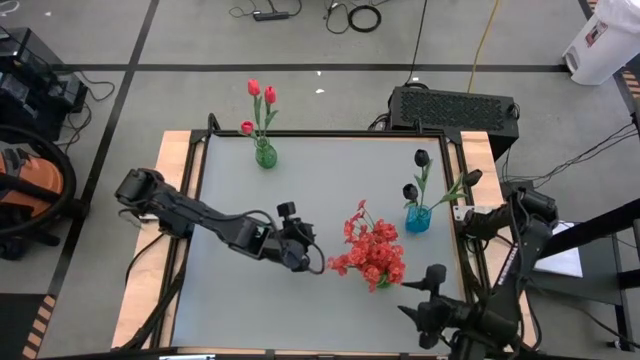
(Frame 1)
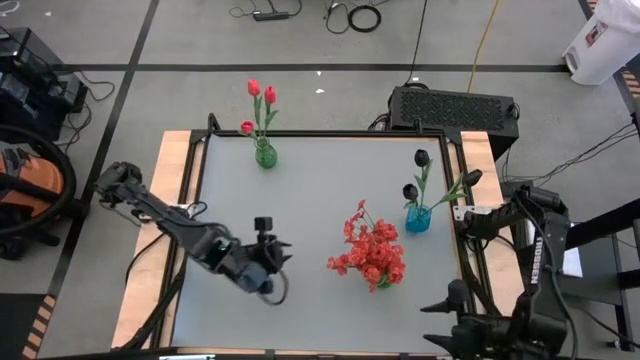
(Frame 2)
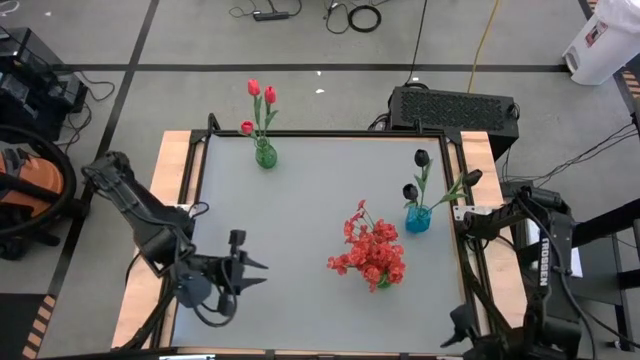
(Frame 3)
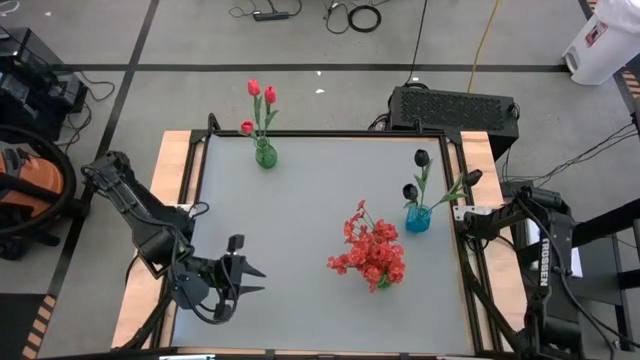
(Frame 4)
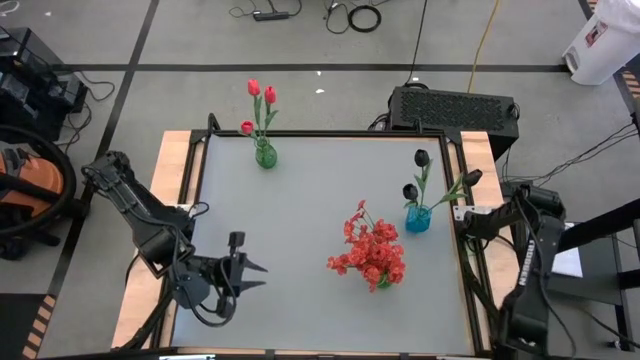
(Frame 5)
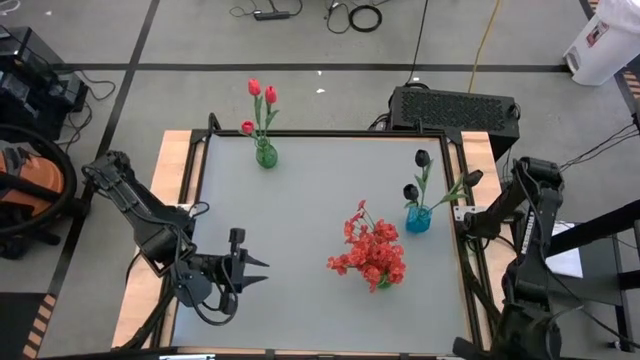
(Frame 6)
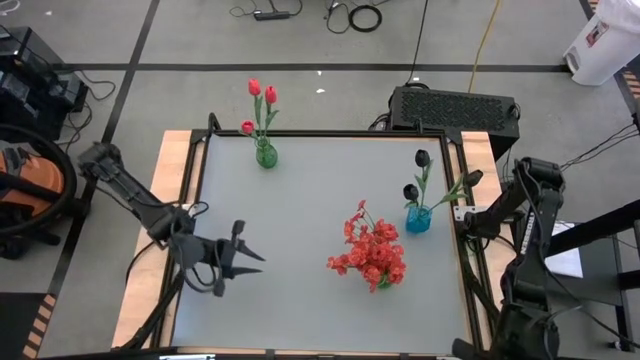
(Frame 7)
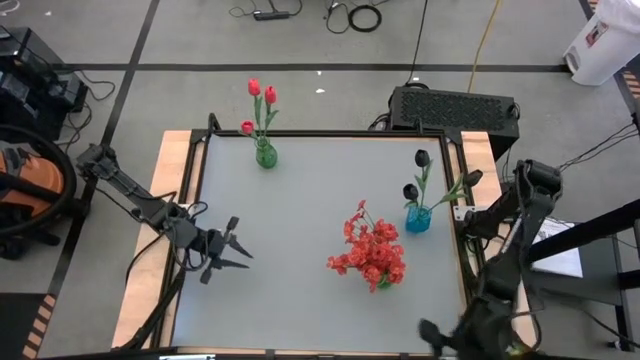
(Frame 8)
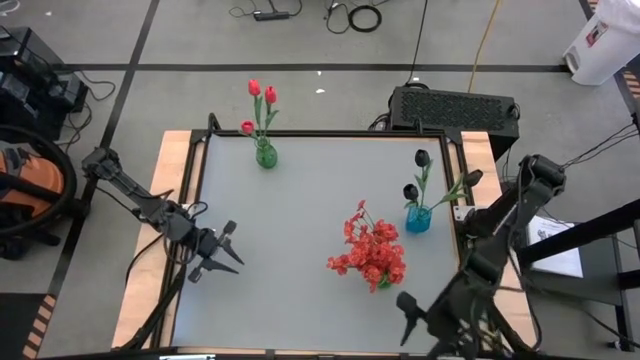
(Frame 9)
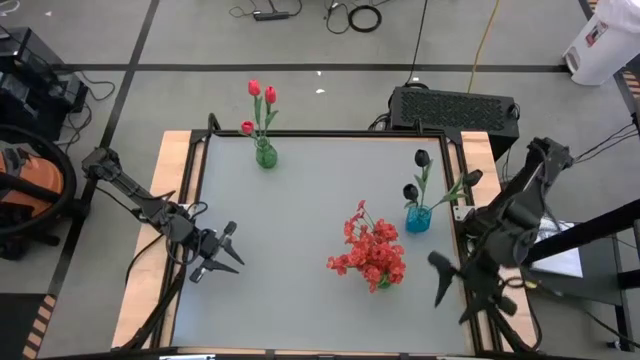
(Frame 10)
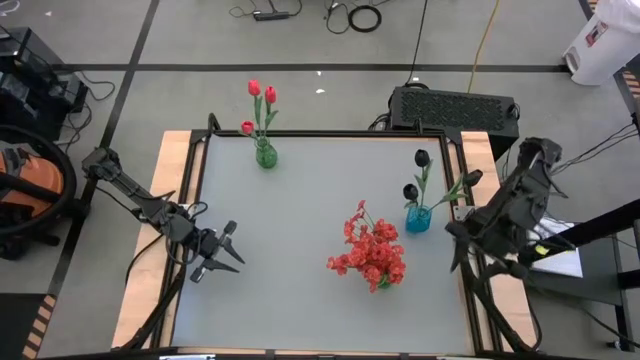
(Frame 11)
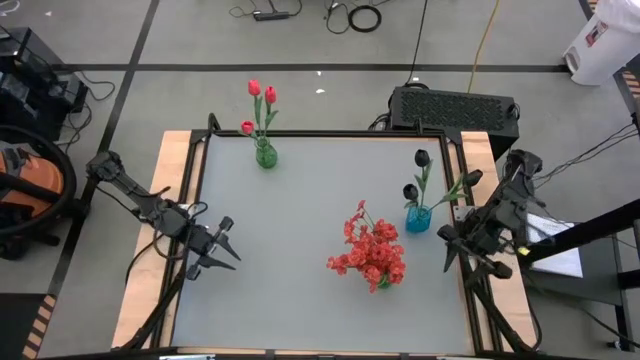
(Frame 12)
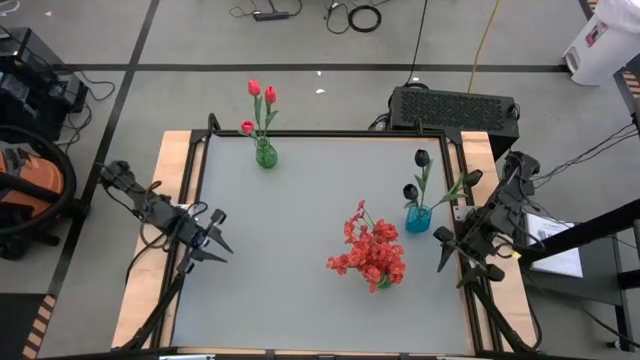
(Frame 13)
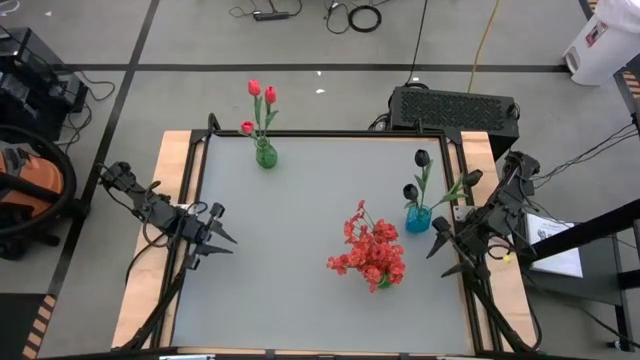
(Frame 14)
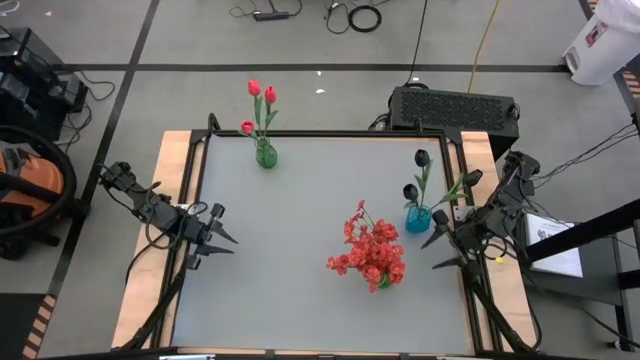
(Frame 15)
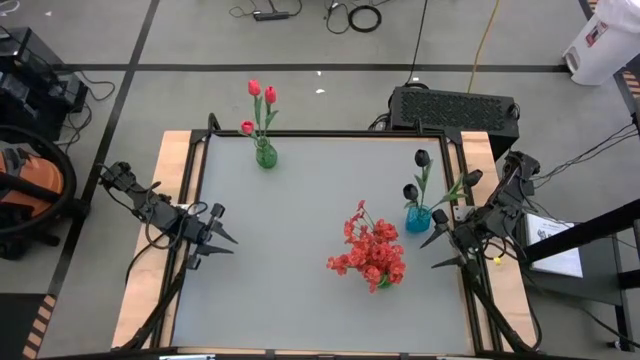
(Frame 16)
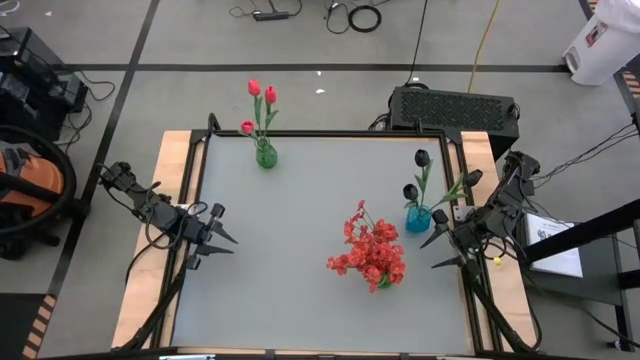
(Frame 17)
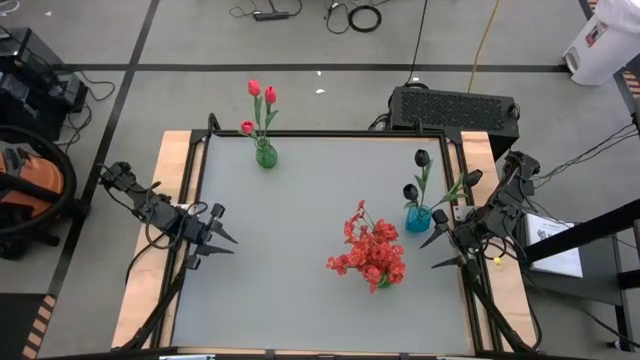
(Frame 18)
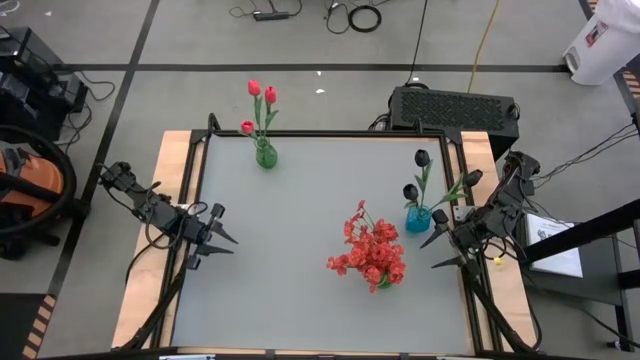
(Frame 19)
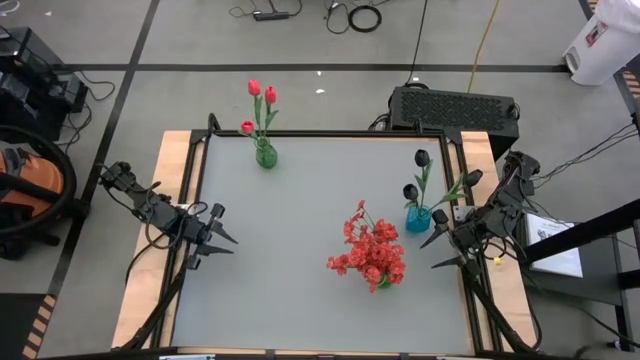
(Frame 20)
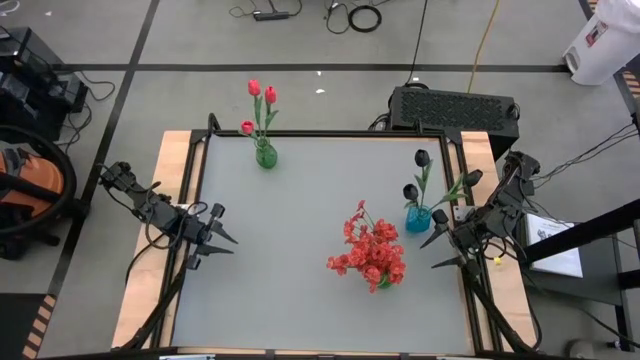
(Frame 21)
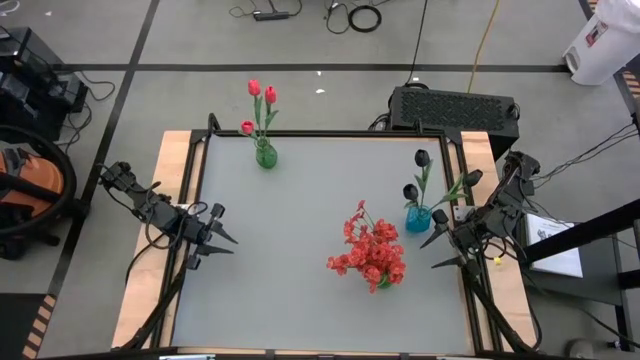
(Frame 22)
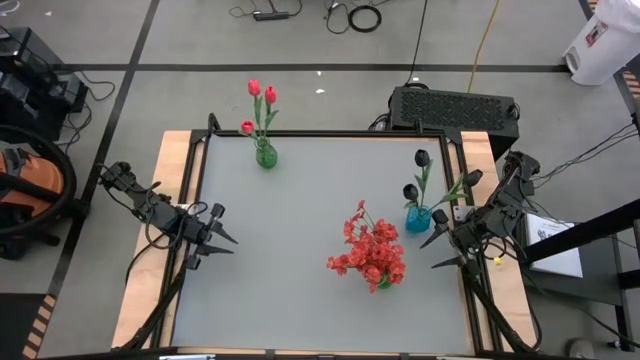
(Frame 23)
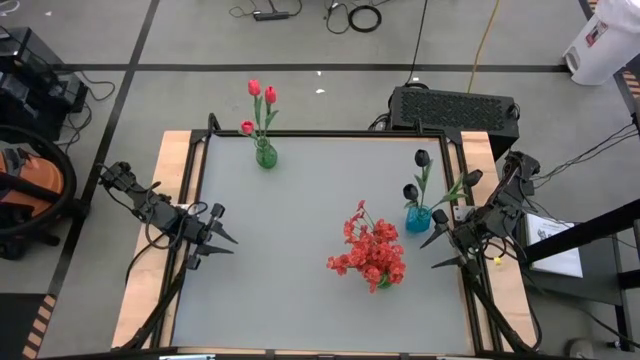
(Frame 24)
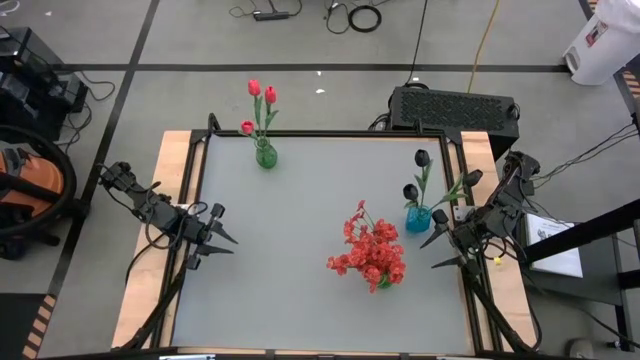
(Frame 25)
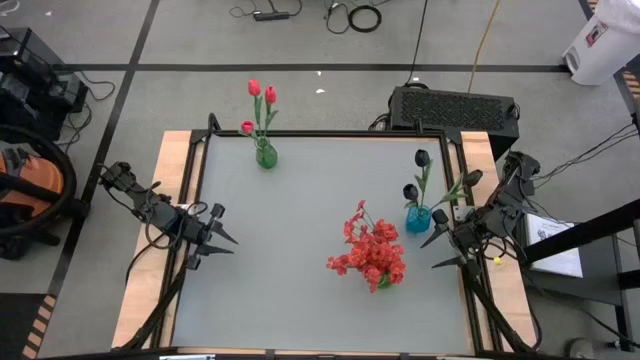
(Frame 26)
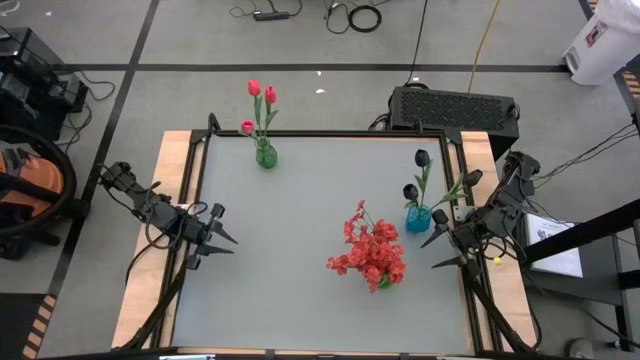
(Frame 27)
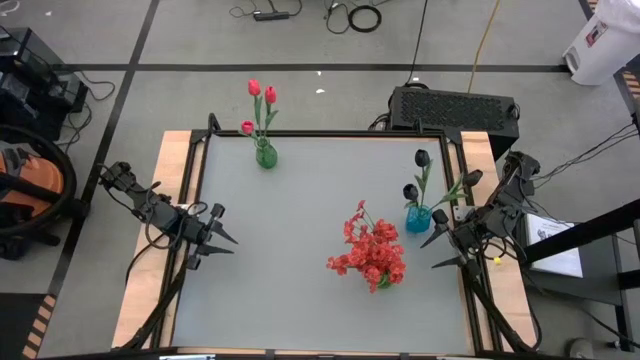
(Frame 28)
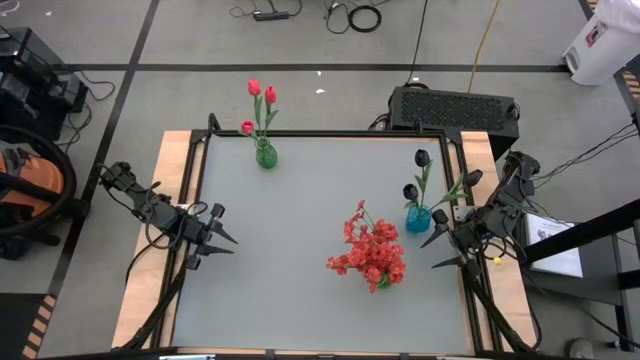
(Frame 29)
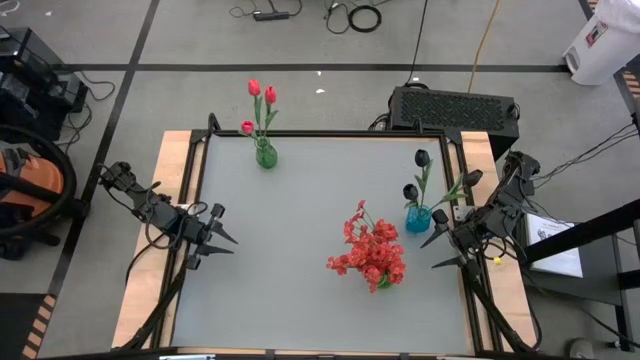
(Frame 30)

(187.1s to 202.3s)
Task: Sort flowers into vase by color
Return to Home Position

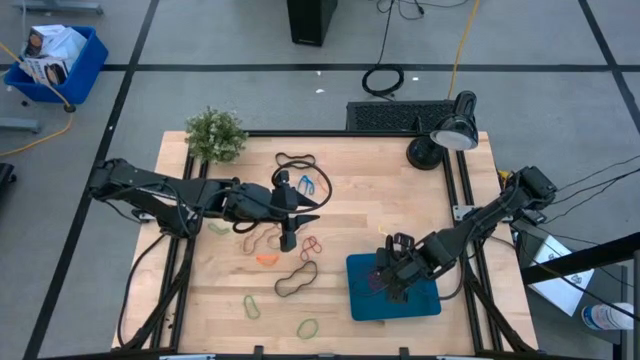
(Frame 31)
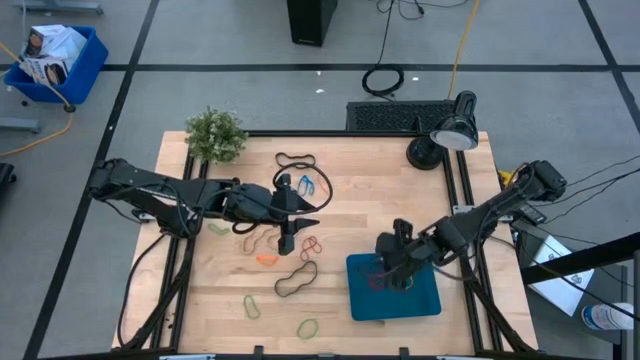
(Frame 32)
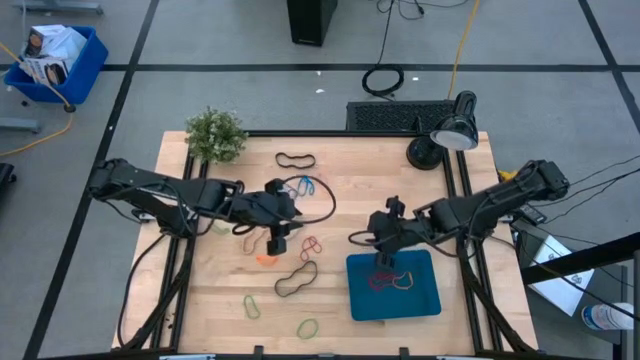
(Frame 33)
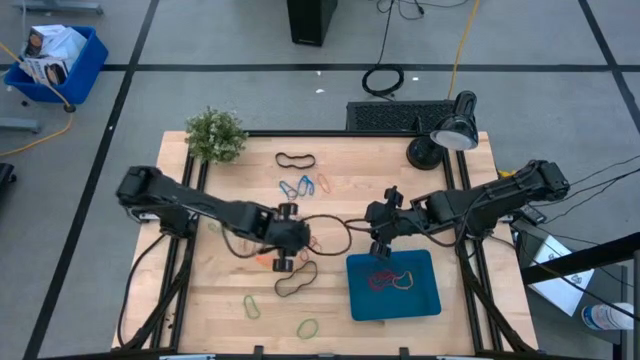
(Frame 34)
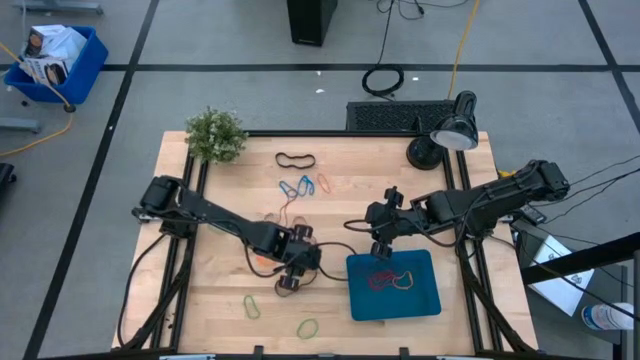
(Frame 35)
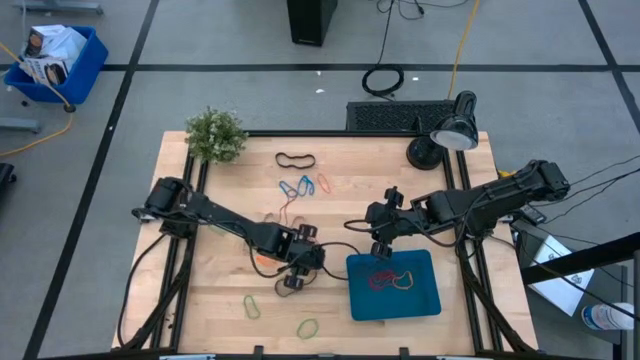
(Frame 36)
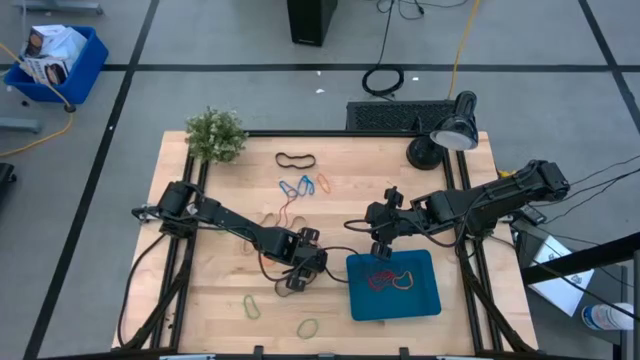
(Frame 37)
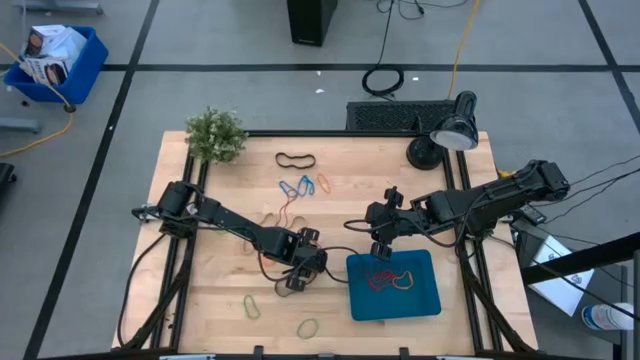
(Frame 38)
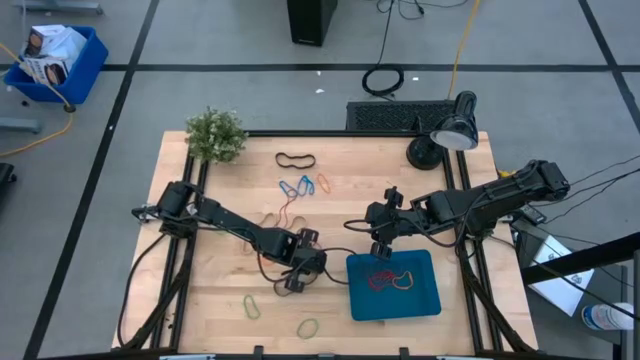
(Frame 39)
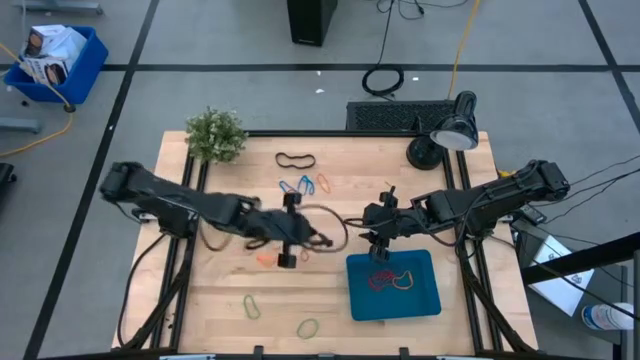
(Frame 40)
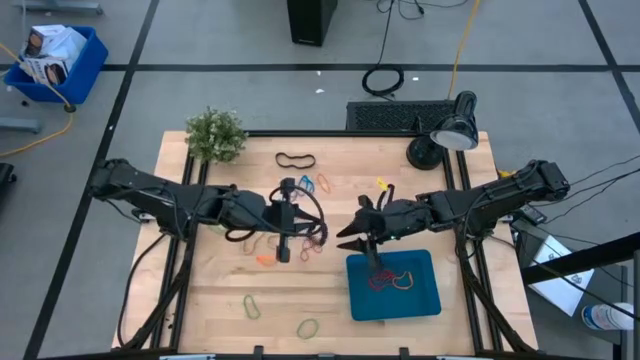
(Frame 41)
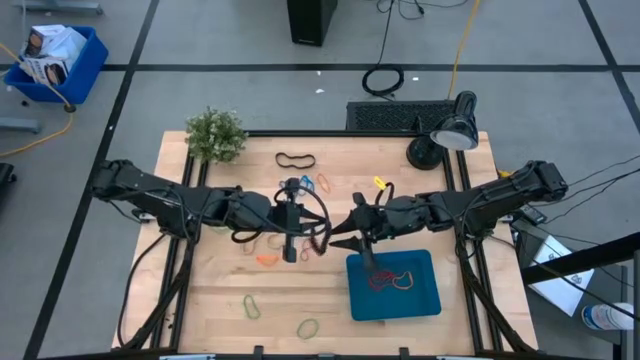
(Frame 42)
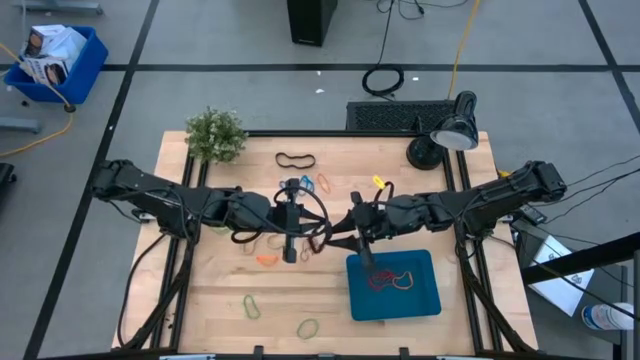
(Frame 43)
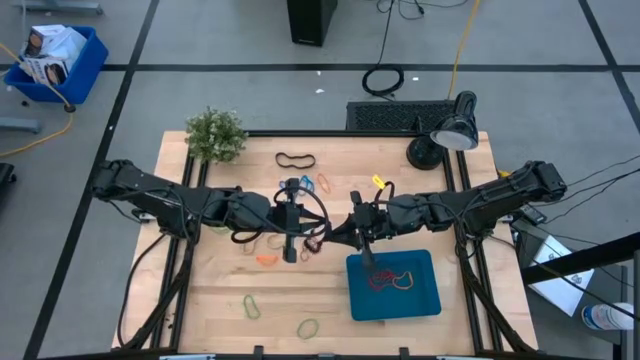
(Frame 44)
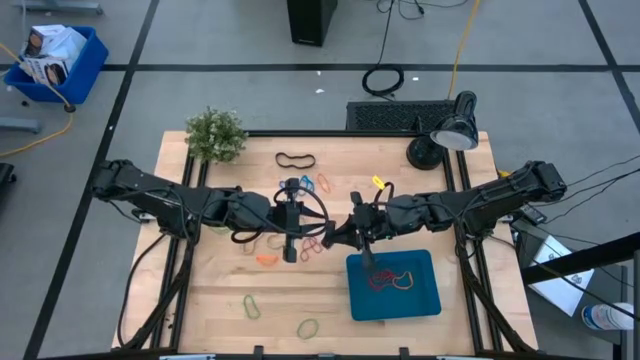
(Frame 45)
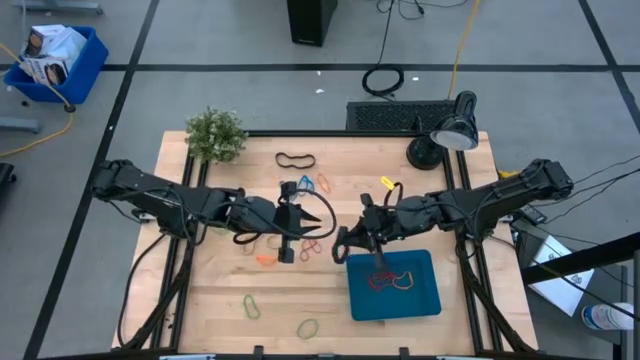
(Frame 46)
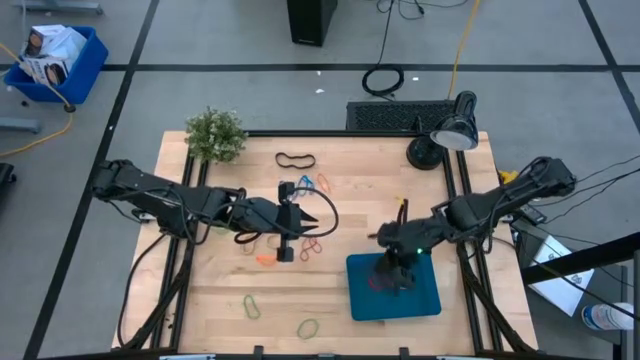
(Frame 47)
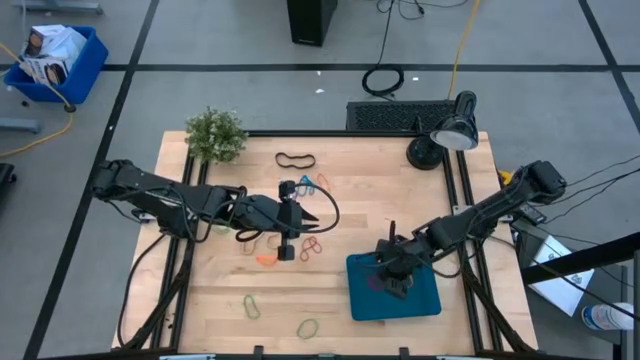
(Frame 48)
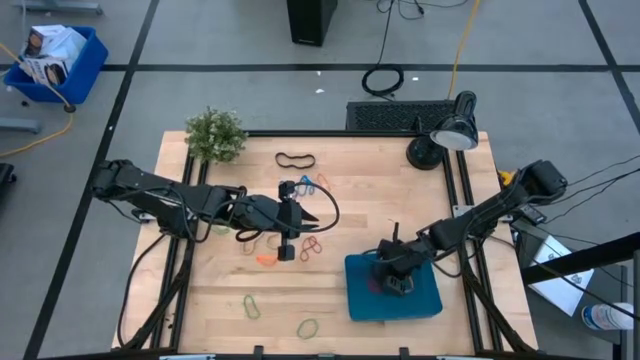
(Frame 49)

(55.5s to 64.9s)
Task: Pick and place rubber bands into bin
Put the black rubber band into the blue bin
